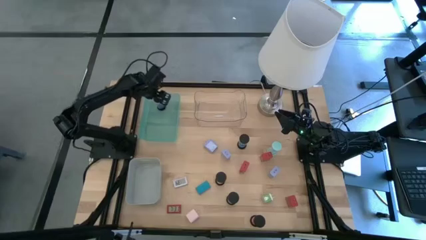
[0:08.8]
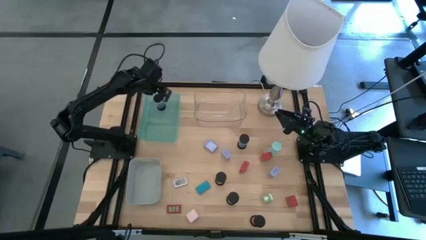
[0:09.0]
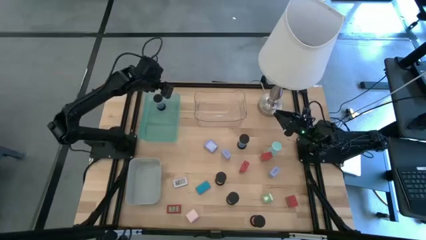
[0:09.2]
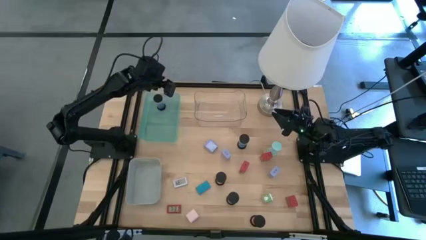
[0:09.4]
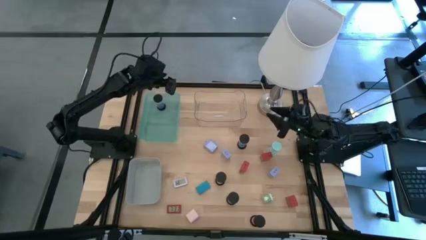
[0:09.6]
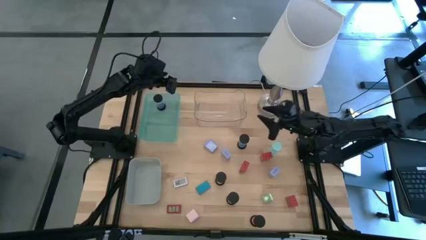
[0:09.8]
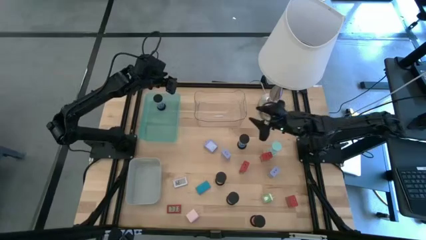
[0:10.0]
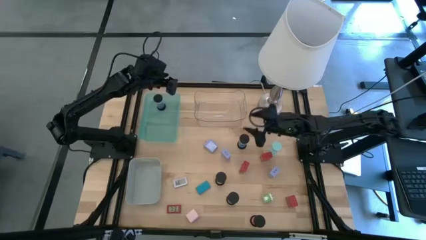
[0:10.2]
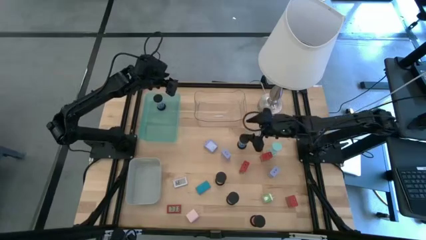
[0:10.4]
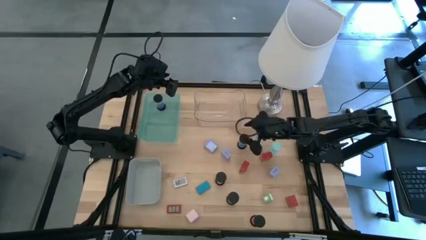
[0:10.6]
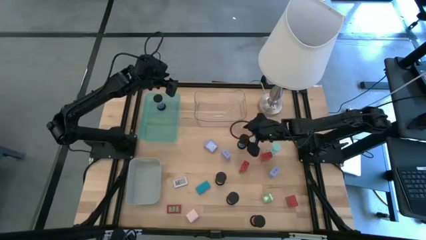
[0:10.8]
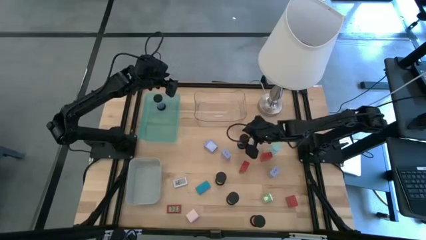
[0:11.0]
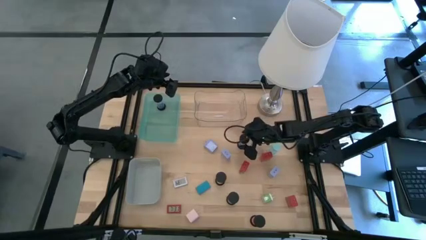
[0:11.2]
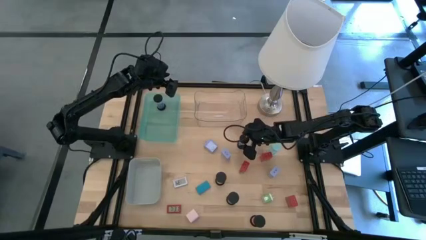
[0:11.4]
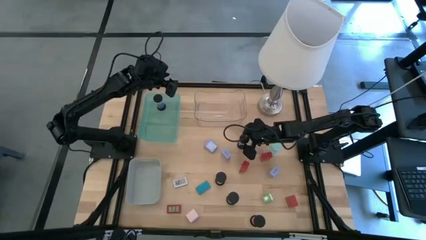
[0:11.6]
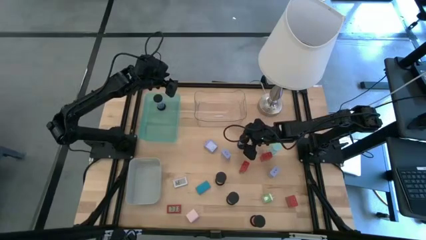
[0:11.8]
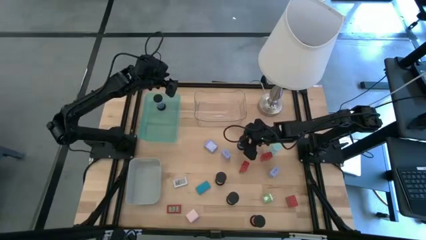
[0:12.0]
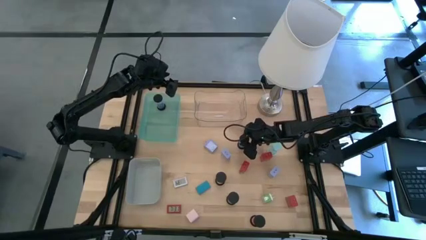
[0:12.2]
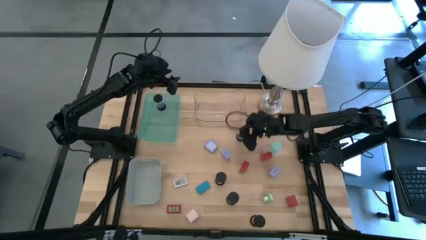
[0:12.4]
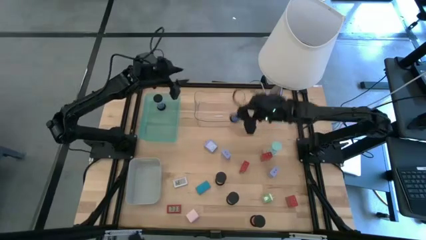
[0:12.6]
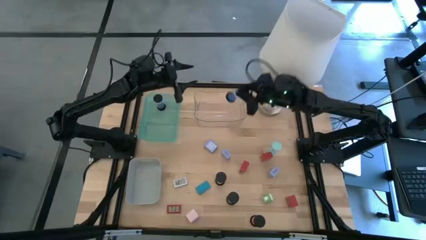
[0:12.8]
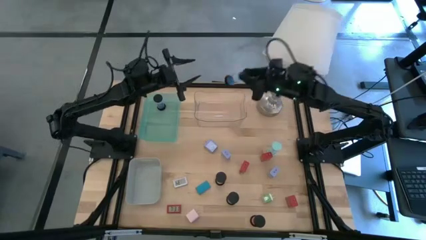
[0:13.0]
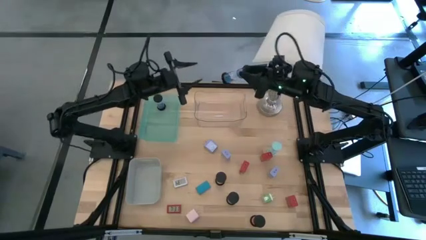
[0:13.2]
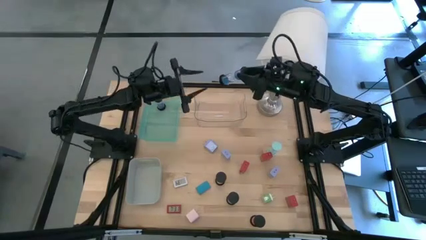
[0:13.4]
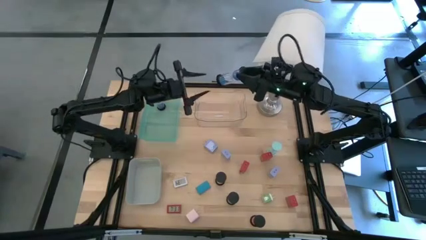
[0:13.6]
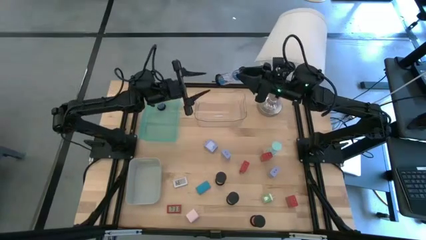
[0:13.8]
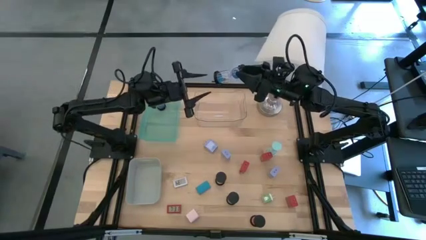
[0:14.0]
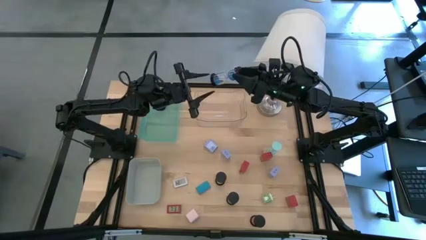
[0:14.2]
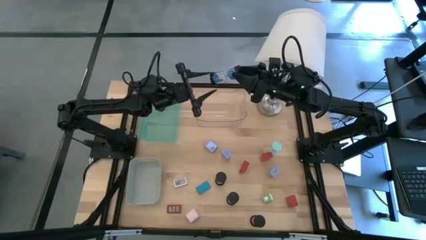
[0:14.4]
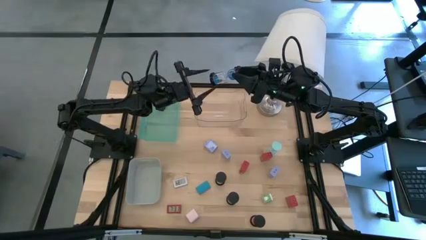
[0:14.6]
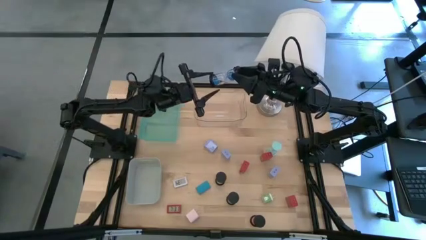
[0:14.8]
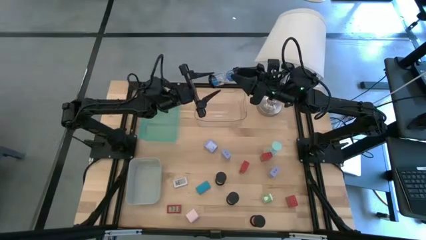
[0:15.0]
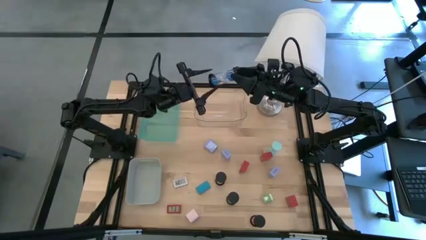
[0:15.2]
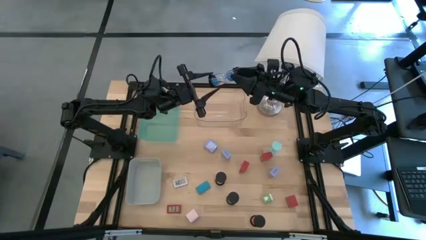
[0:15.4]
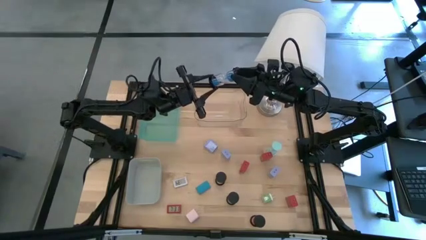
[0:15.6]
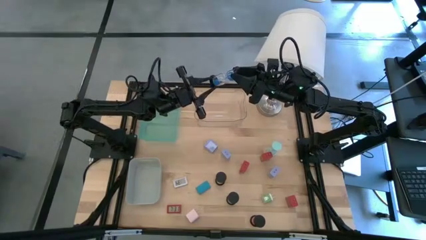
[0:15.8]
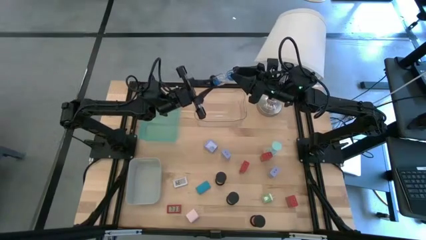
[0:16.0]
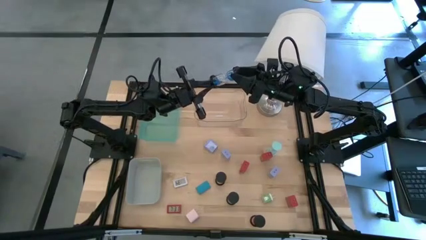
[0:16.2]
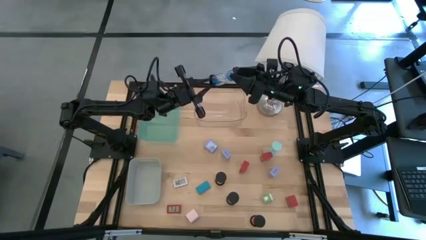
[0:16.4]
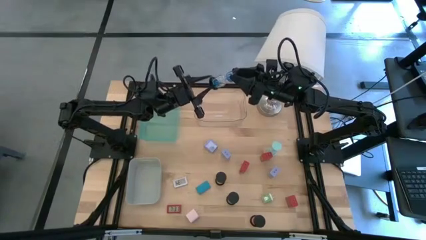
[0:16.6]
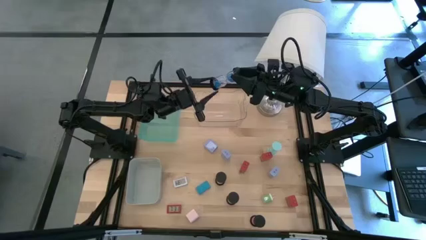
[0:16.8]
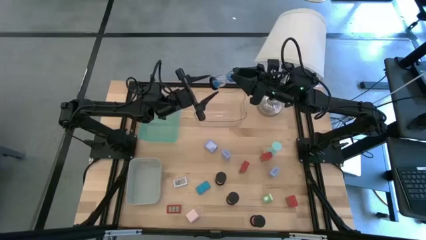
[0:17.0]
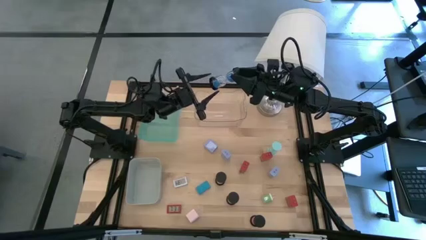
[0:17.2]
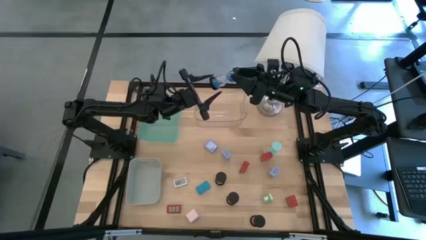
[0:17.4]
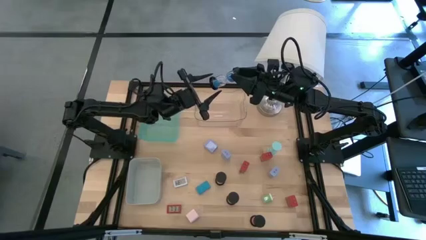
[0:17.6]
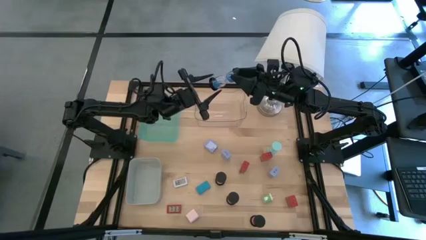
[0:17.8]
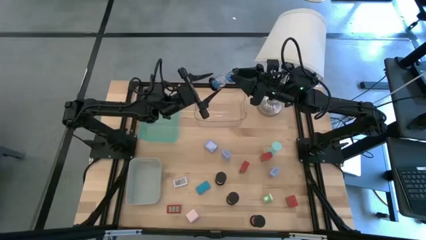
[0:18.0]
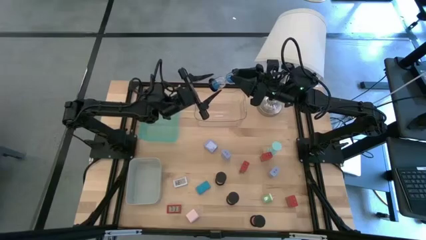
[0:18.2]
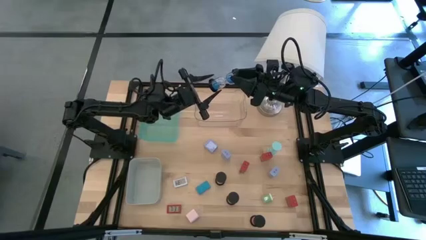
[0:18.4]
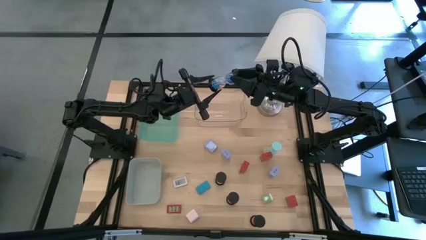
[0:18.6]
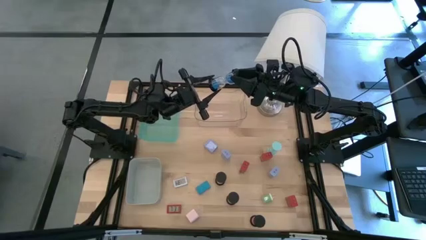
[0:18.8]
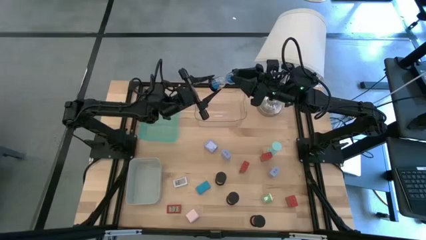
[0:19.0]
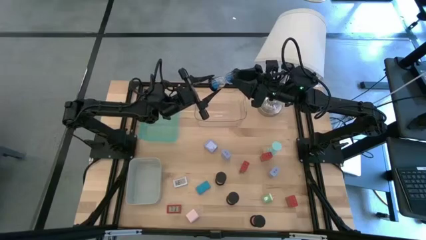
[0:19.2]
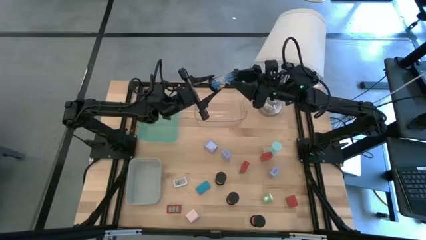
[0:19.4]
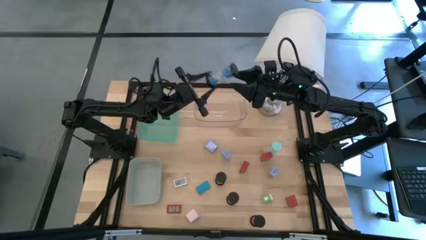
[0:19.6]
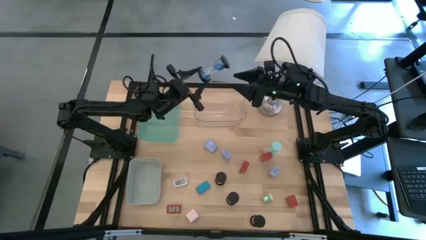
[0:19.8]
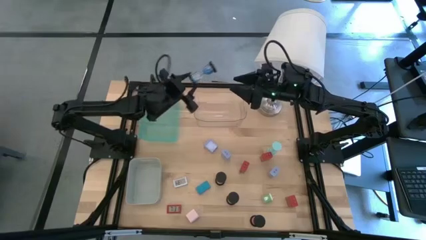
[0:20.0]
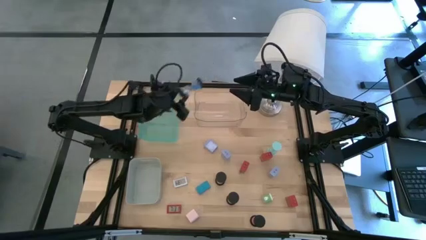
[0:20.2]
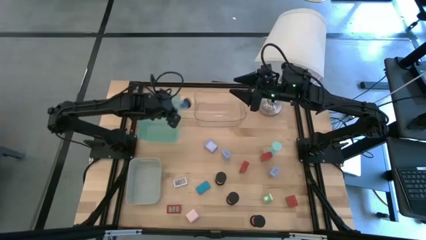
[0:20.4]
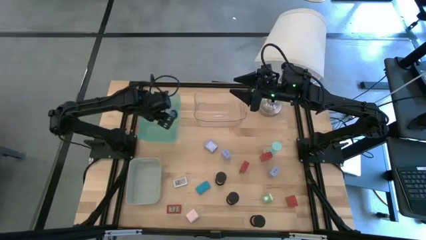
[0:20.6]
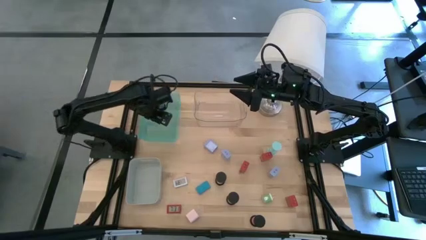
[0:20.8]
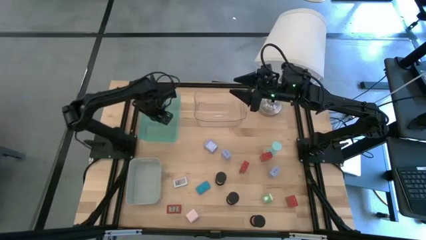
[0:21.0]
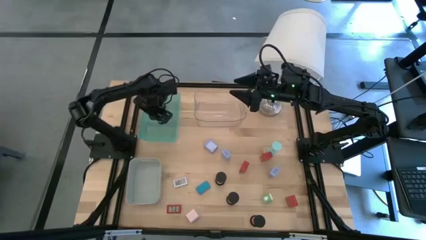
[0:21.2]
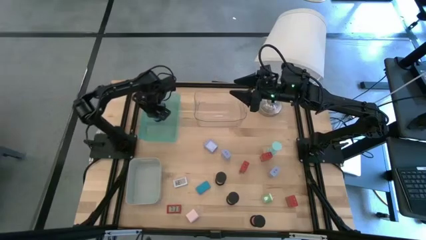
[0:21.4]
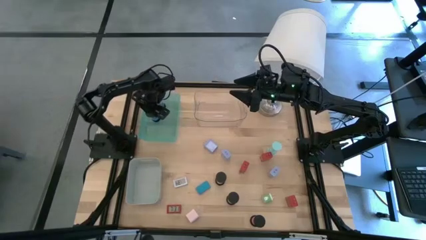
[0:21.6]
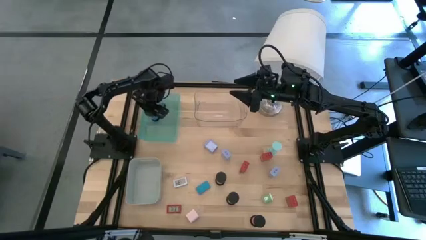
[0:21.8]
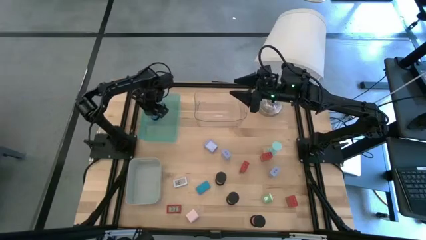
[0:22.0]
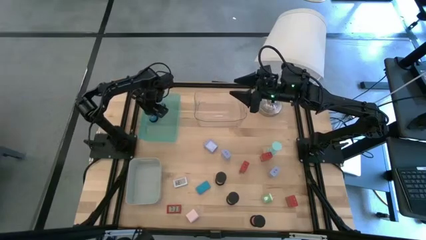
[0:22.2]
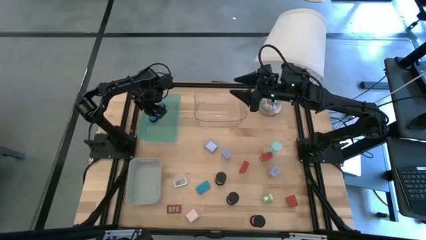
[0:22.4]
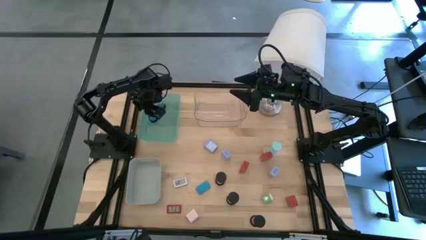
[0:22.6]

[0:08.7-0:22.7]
Task: Pick & Place Office items
Put the blue hourglass into the green bin

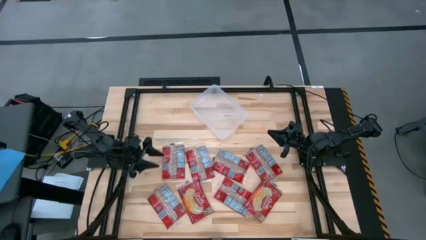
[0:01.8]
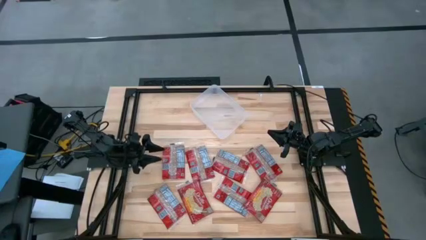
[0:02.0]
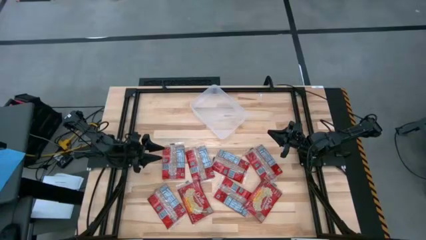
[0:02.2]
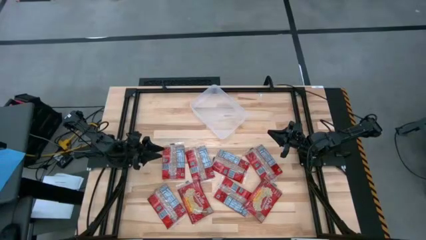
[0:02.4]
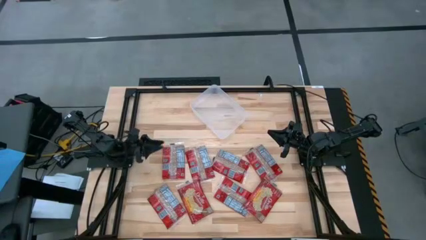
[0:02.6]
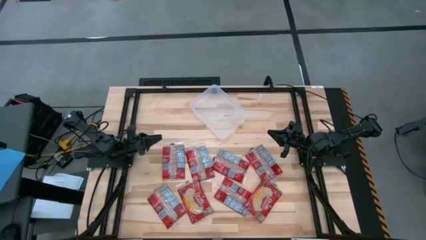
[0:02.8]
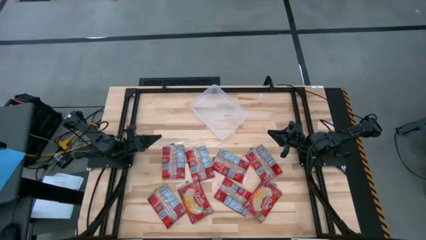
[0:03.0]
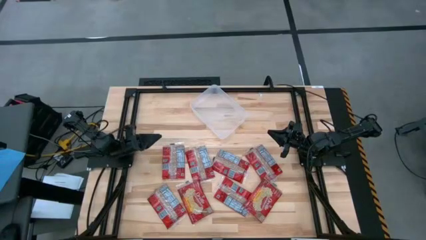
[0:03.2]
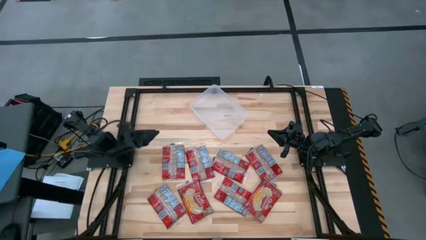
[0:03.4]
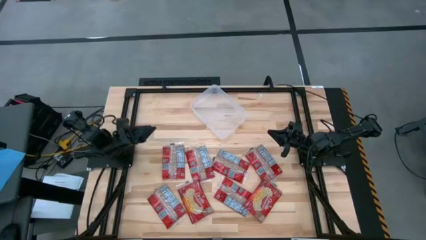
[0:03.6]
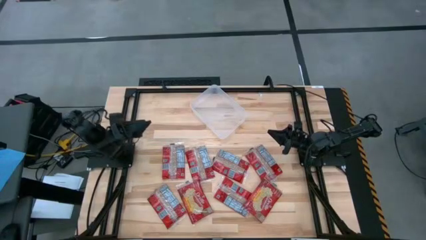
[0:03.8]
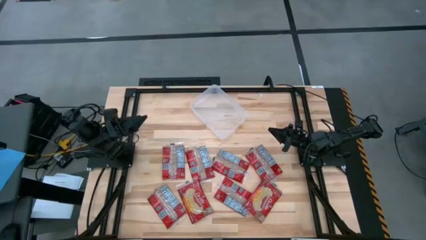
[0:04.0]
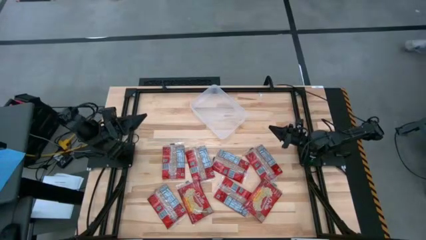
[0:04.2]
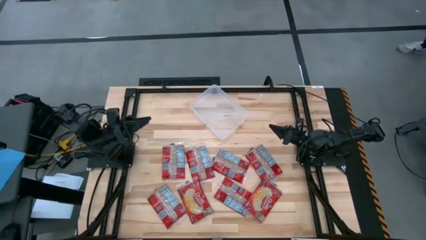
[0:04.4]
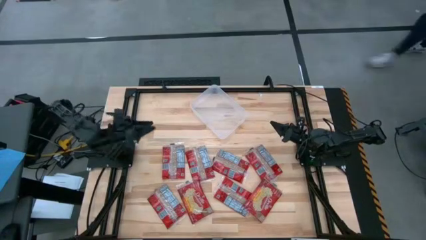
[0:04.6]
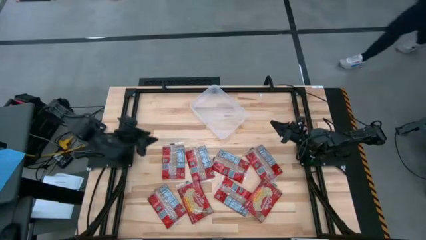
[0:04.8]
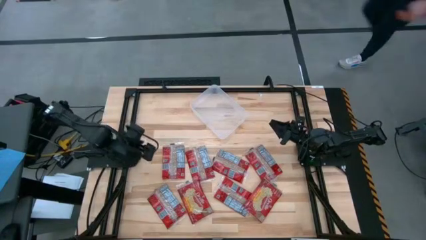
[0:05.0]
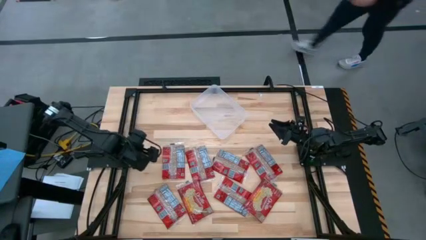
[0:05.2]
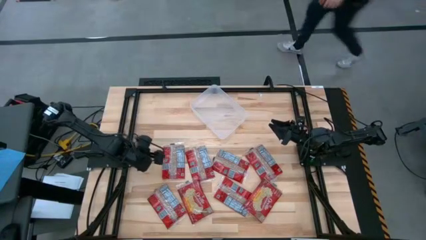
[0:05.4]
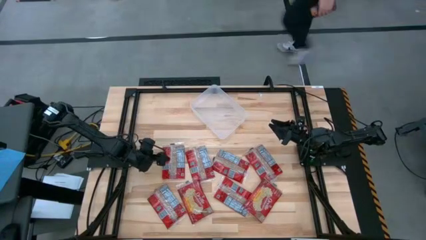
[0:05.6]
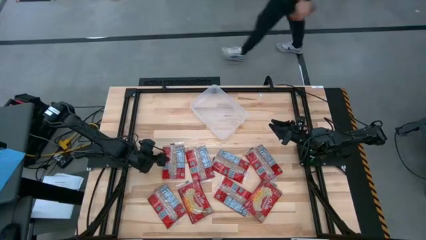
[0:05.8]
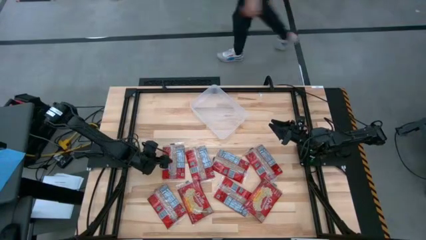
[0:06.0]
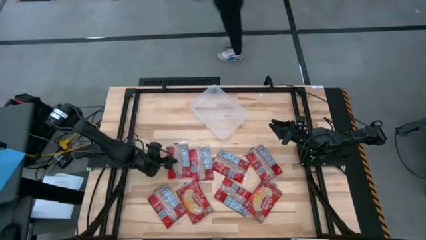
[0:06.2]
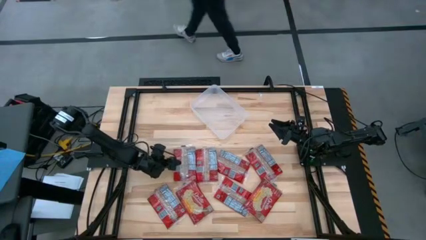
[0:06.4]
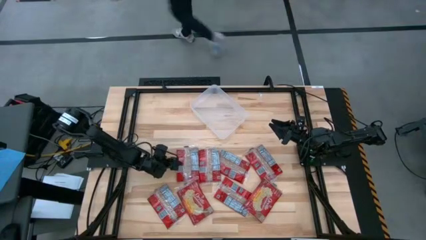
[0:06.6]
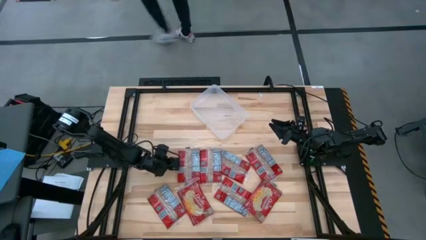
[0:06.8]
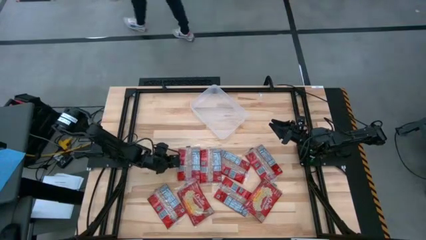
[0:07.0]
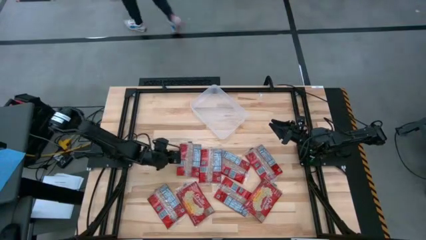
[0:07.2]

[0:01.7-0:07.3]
Task: Sort popcorn bags into baskets
Put the red popcorn bag into the white bin
